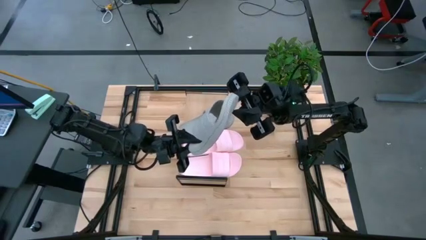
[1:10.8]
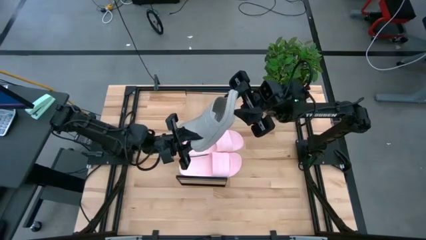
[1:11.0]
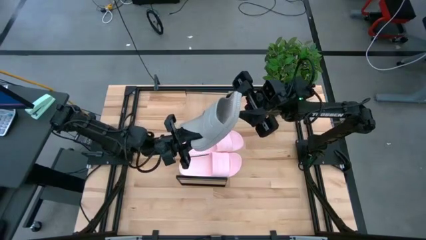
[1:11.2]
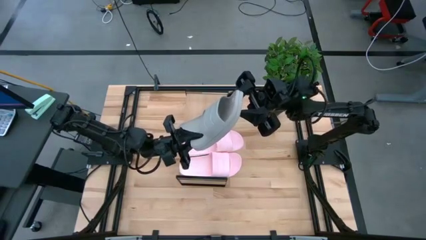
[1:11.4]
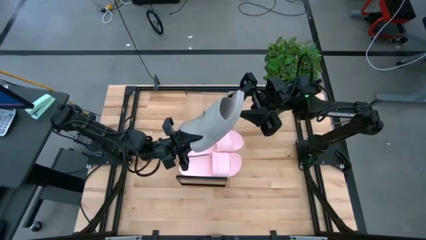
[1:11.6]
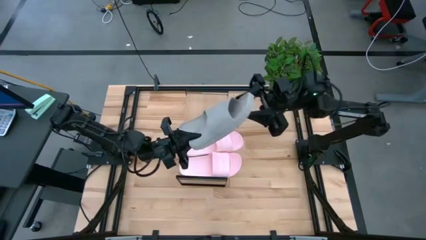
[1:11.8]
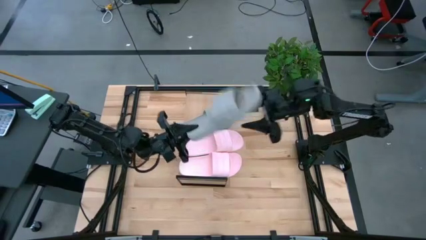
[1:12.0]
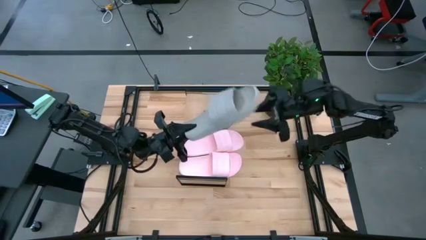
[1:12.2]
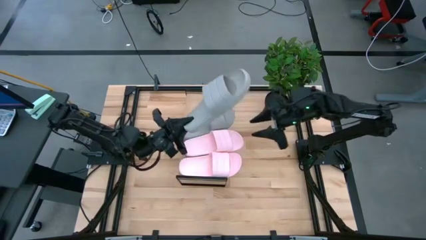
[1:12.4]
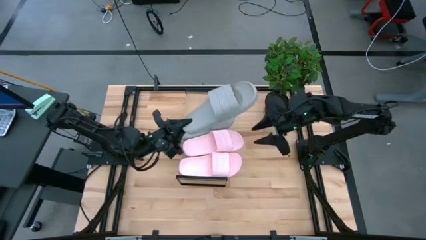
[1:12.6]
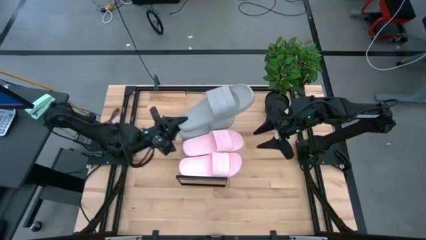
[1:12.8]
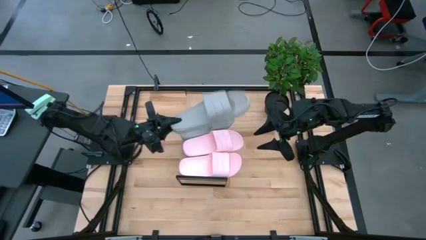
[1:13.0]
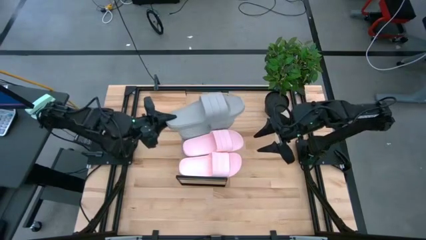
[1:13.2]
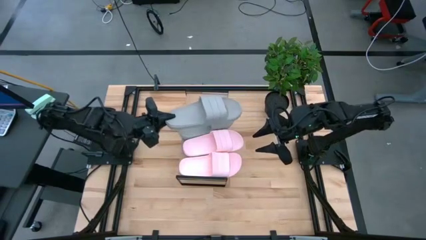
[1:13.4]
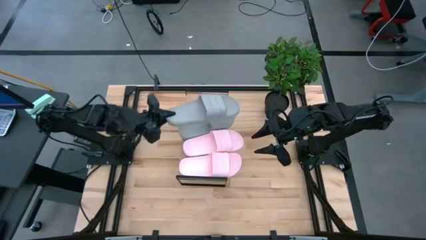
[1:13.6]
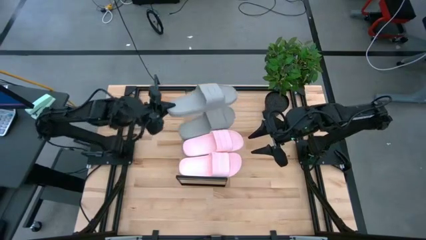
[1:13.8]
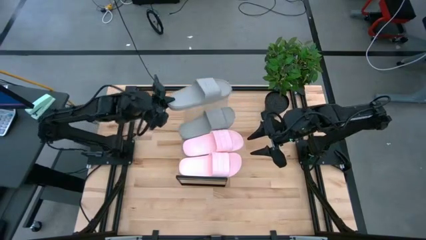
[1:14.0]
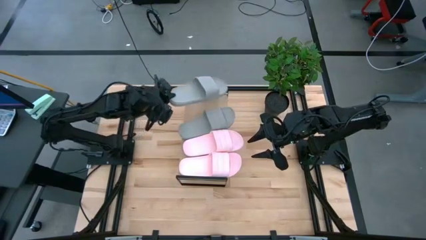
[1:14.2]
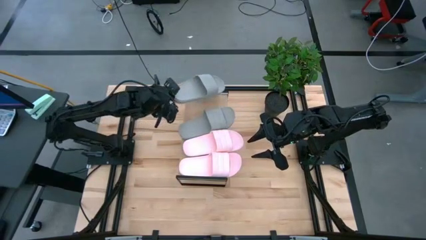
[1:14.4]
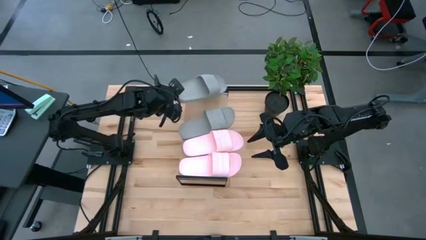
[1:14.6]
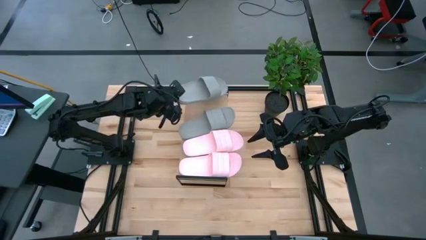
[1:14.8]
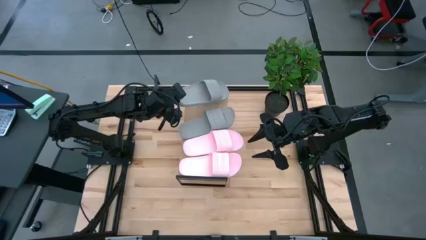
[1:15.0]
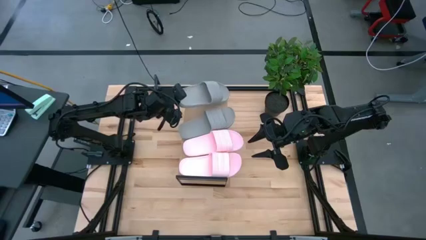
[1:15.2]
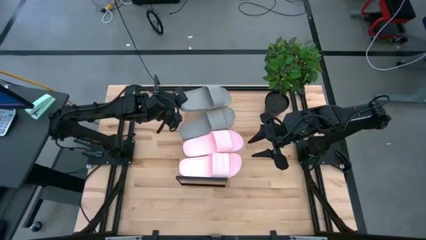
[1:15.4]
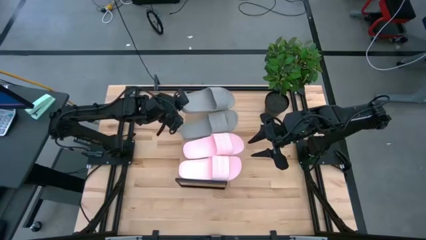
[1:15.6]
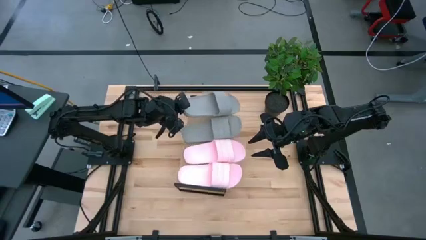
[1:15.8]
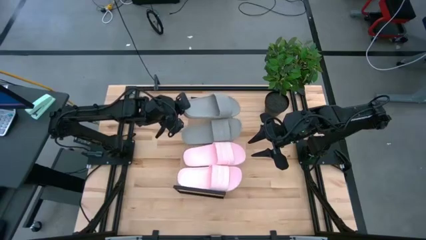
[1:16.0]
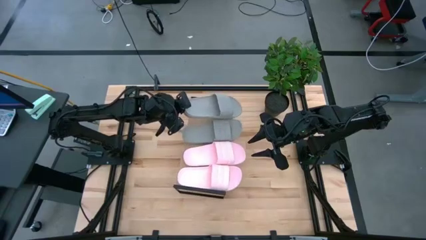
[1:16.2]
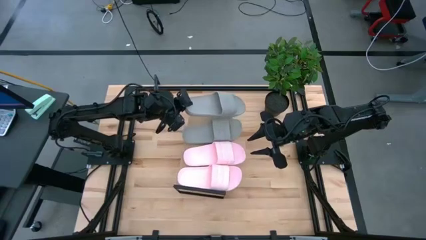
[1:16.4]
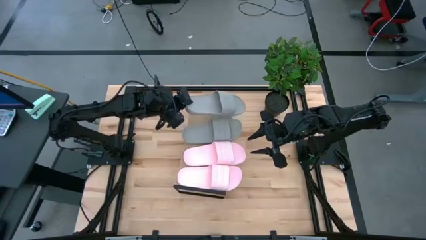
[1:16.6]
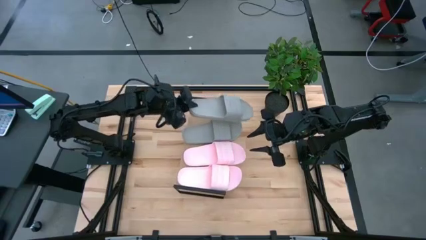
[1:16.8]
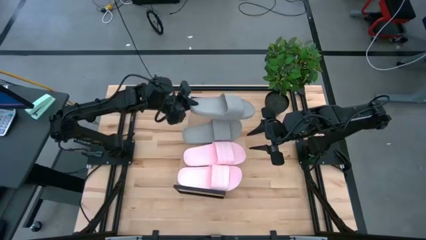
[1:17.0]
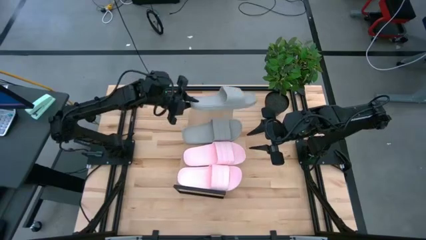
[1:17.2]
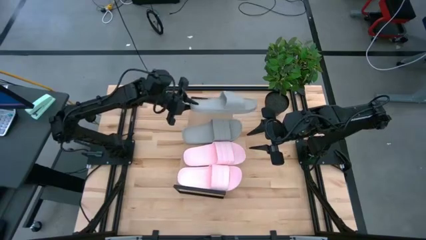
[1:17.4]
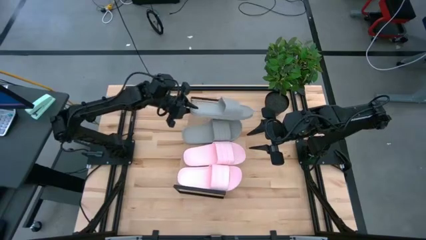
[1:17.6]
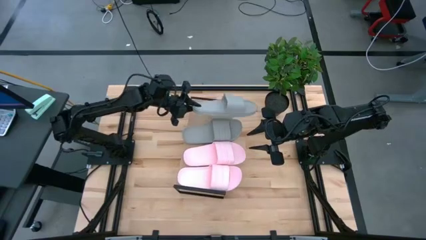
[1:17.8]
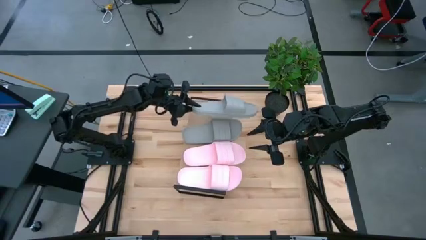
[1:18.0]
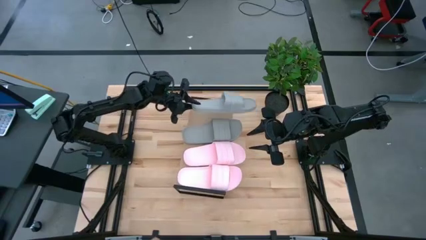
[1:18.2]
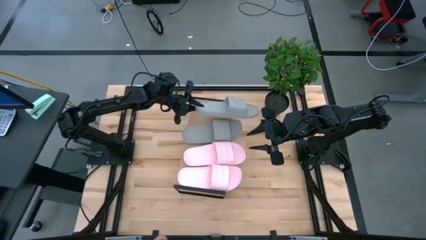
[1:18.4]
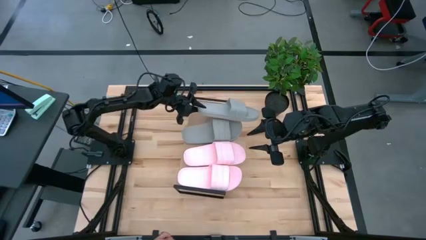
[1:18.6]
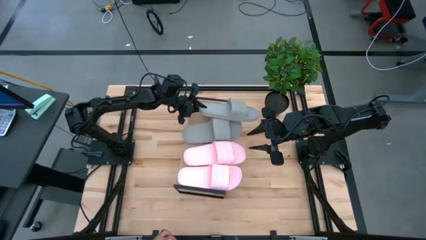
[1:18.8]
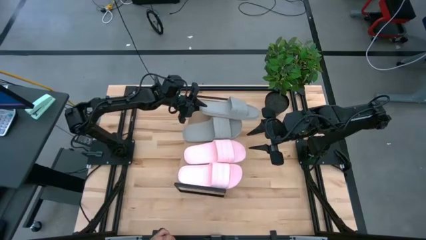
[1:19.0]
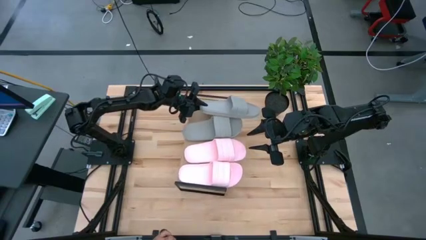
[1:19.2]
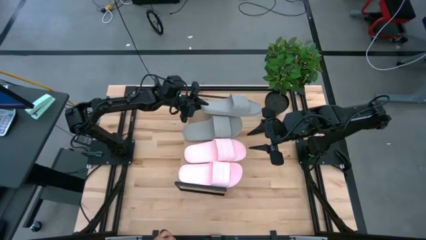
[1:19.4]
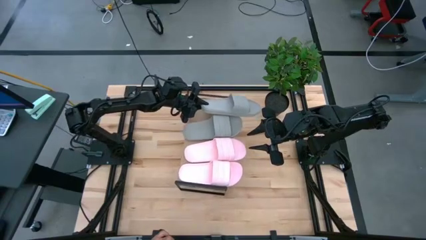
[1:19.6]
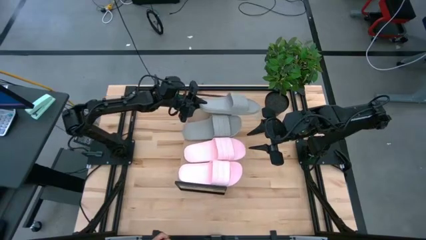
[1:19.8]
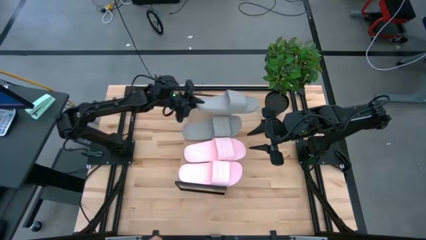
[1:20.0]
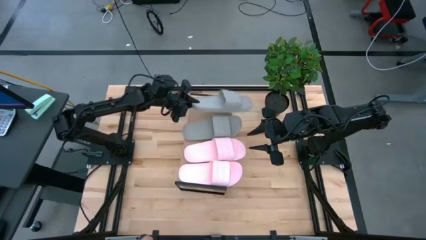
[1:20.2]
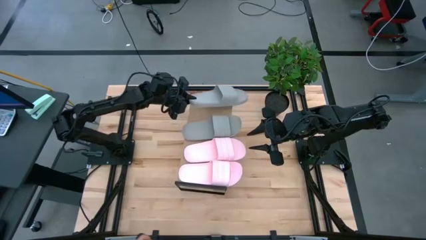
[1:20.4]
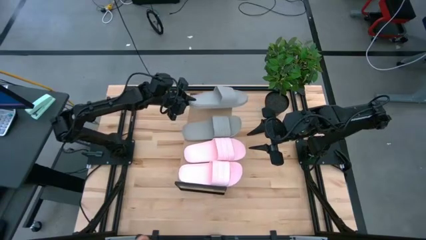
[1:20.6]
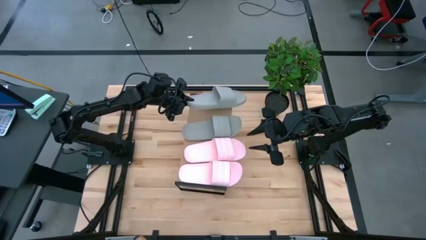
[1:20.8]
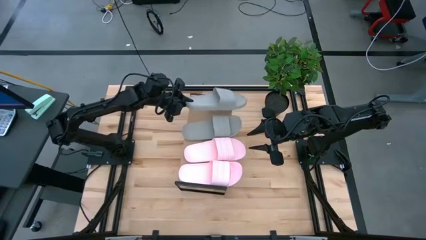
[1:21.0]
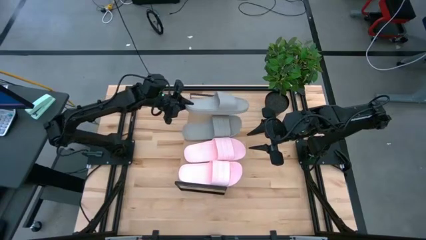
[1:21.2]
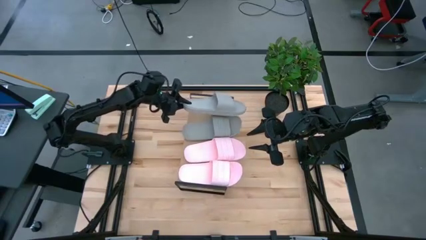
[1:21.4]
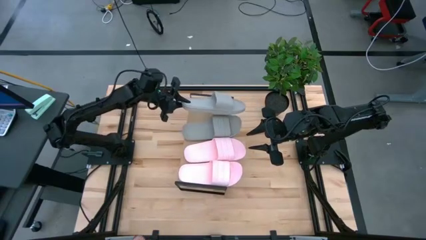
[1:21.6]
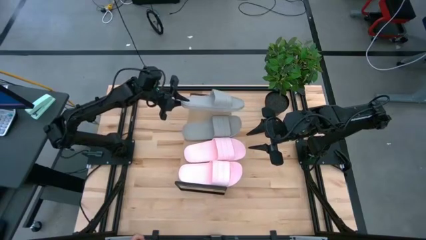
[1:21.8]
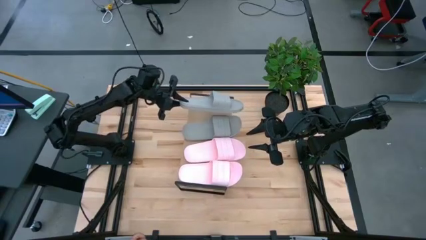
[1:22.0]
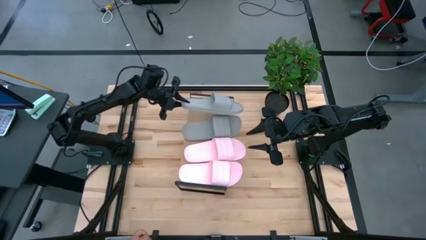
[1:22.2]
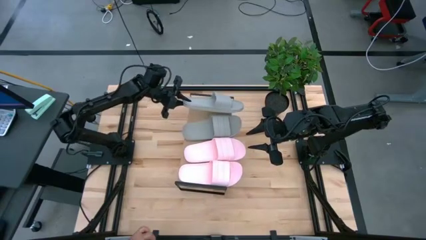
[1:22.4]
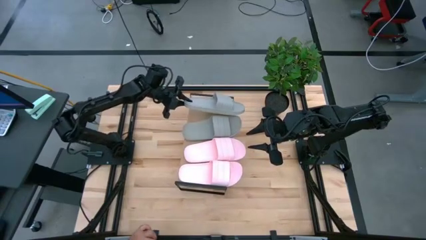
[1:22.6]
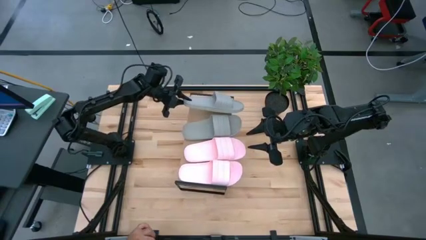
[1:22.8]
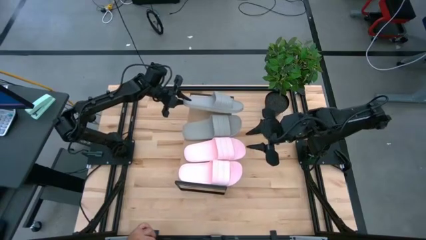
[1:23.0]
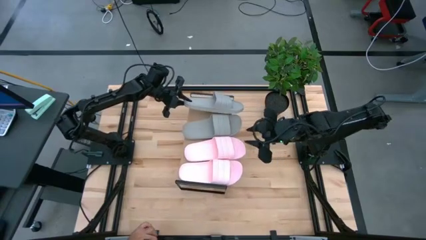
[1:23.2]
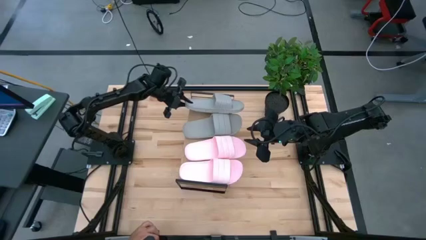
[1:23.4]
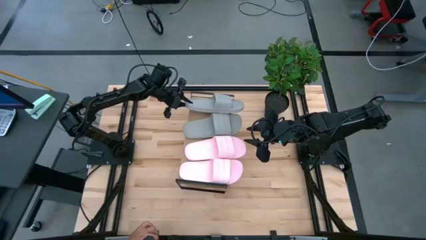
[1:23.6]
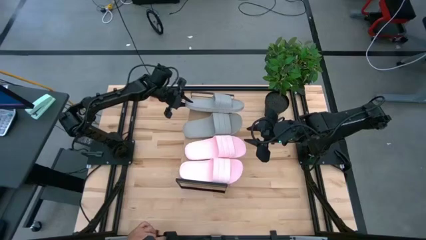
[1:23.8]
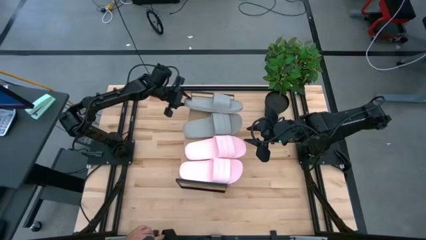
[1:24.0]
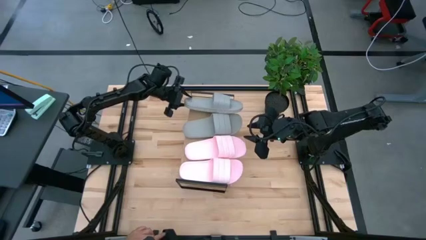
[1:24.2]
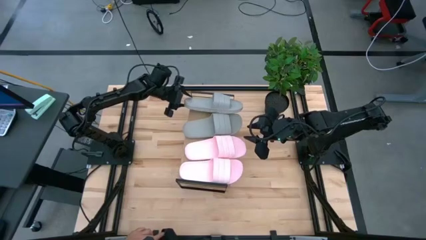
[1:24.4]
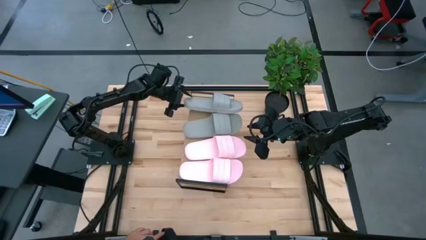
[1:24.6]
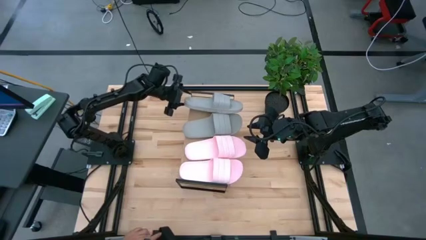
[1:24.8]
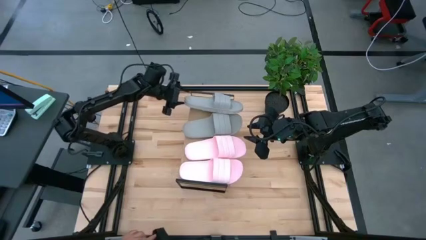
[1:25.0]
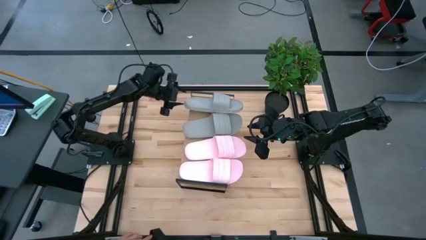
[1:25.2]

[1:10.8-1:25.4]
Task: Pick and place slides into the shelf
Put the gray slides on top of the shelf
